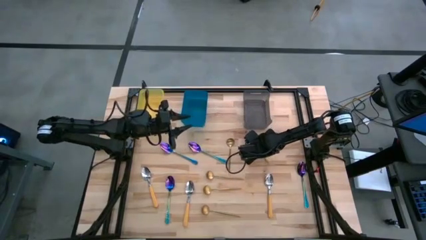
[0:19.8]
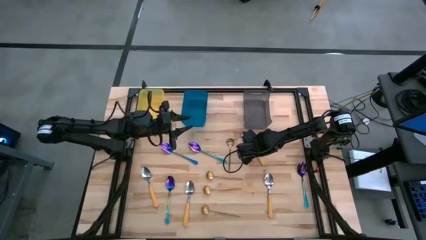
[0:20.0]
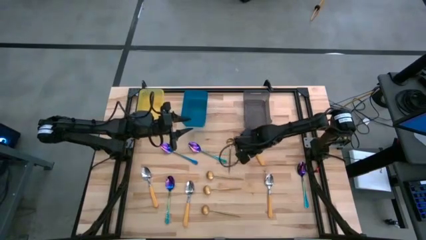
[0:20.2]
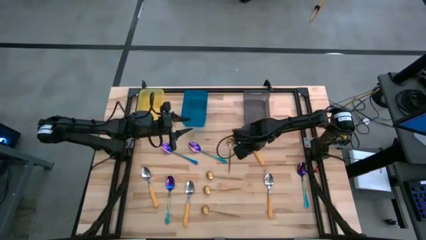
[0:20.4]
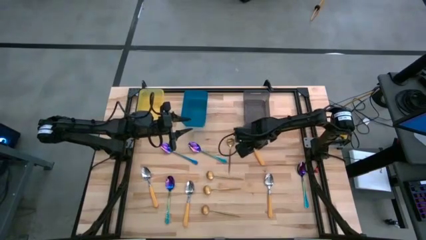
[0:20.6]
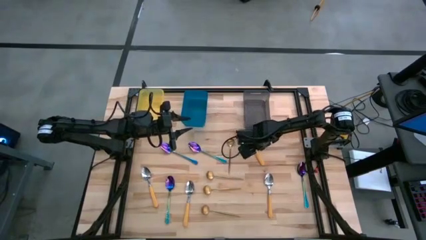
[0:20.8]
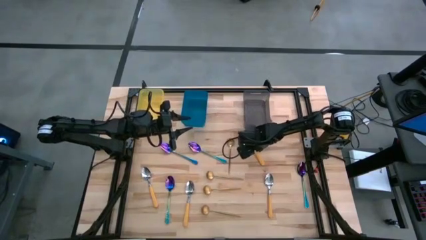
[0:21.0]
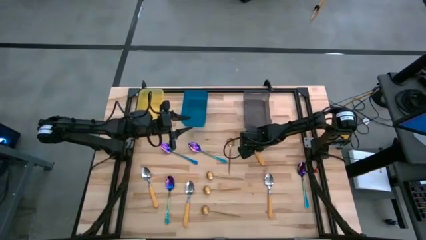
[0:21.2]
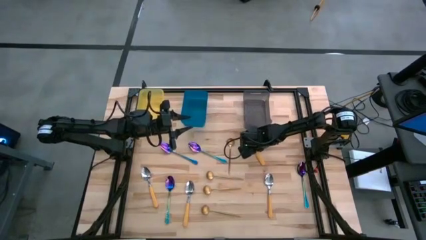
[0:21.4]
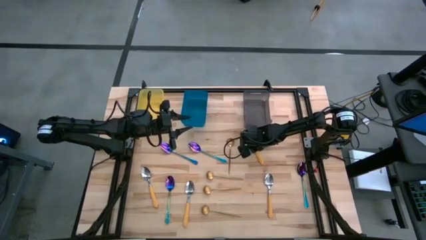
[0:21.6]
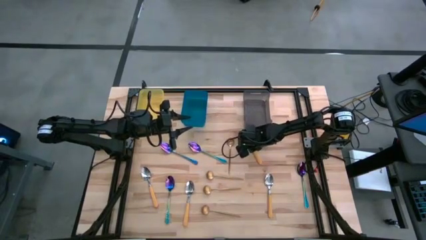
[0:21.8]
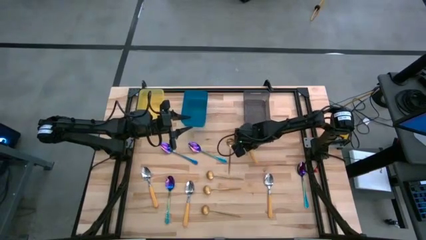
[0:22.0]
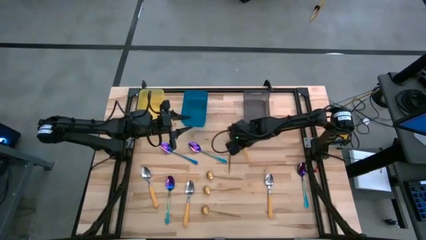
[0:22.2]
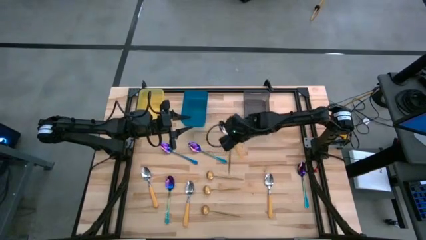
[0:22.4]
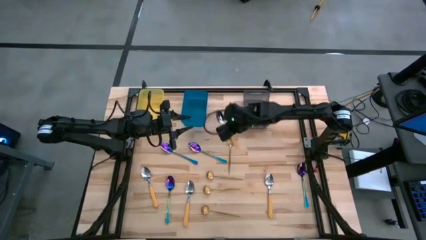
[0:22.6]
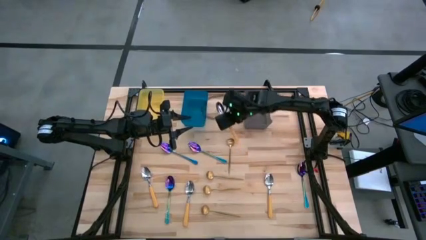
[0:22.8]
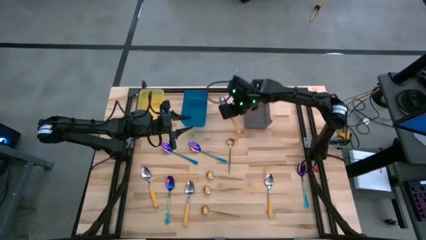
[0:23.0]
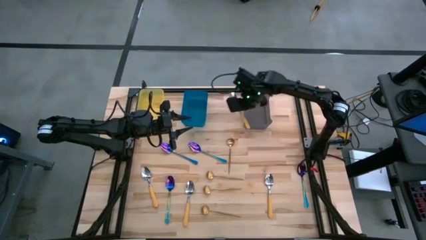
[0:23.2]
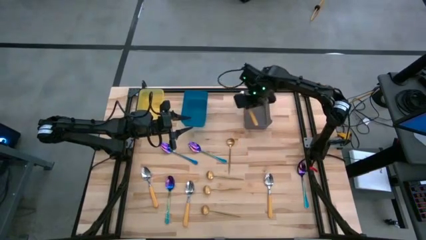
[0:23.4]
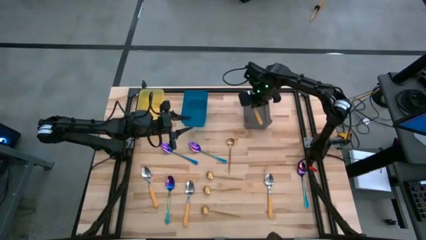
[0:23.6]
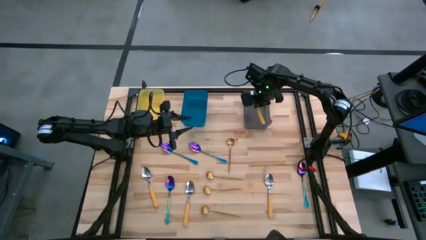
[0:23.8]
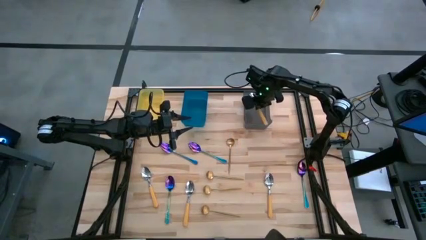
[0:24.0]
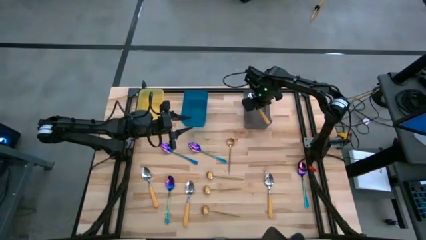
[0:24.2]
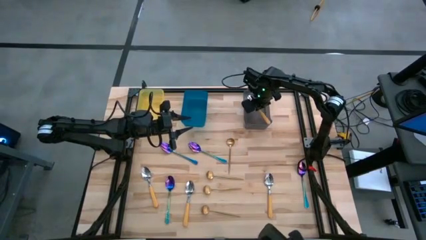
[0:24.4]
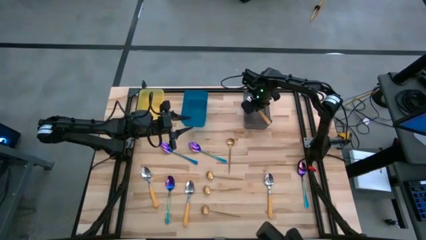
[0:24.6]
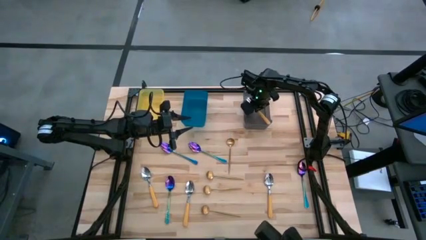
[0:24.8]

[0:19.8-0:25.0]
Task: Sort silverware by color (type)
Put the yellow spoon into the black bin

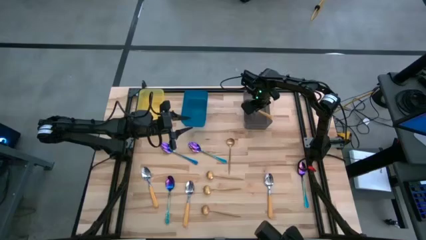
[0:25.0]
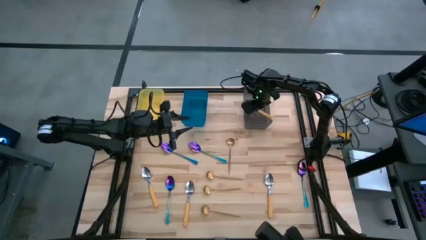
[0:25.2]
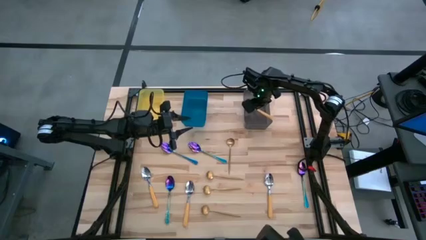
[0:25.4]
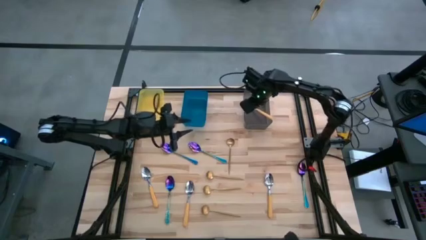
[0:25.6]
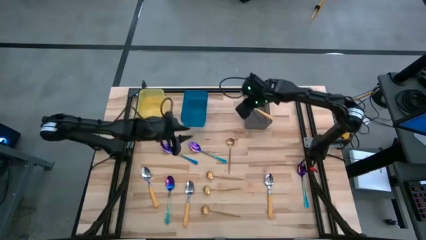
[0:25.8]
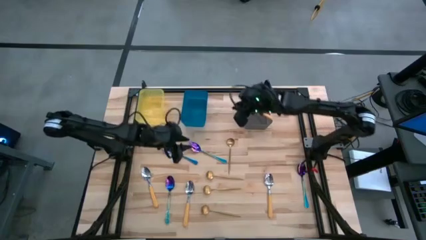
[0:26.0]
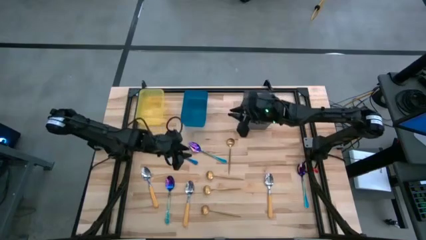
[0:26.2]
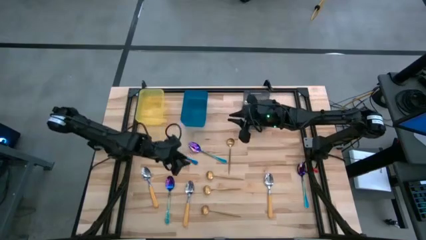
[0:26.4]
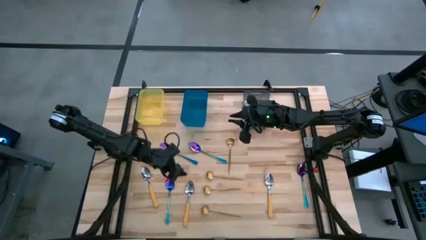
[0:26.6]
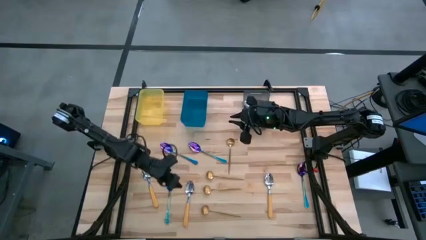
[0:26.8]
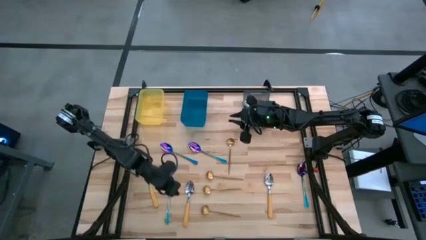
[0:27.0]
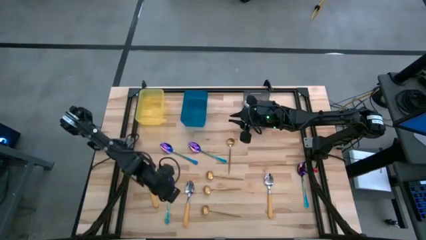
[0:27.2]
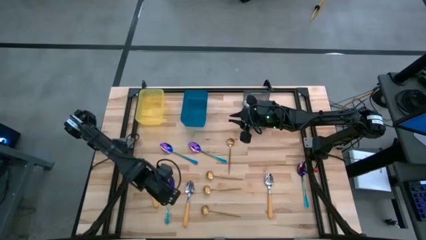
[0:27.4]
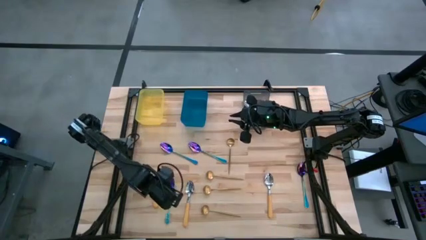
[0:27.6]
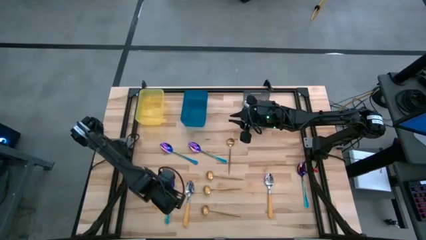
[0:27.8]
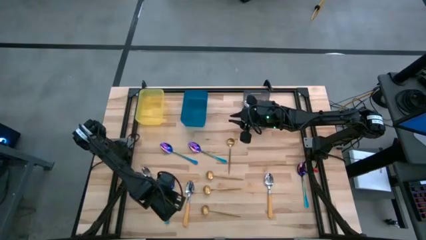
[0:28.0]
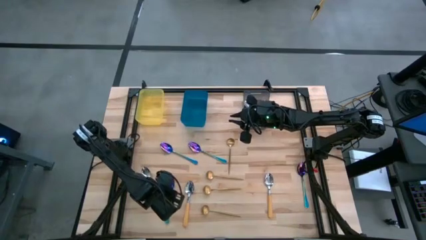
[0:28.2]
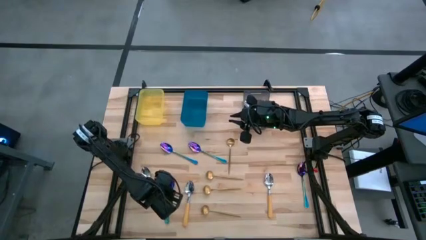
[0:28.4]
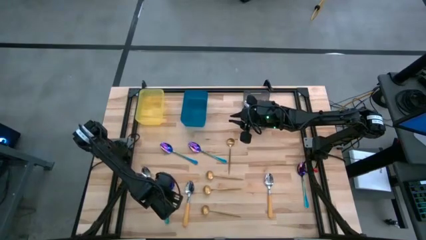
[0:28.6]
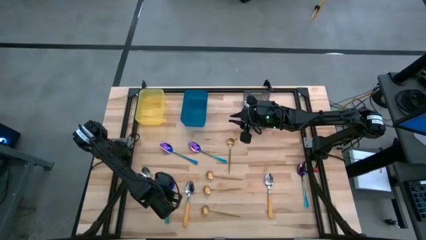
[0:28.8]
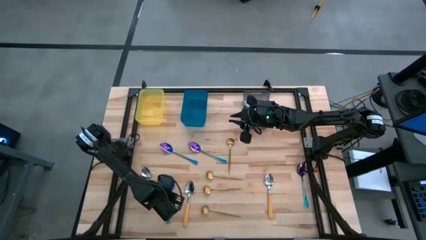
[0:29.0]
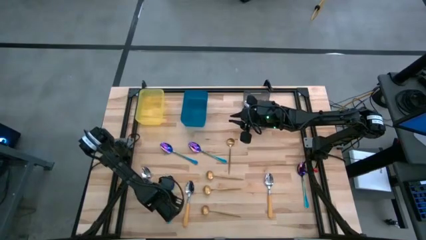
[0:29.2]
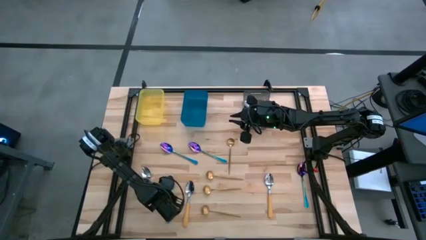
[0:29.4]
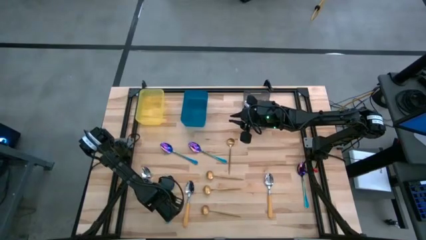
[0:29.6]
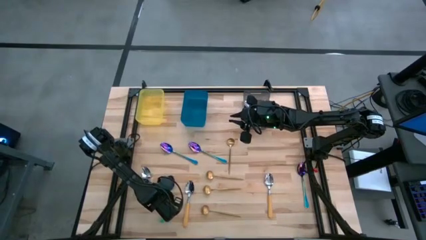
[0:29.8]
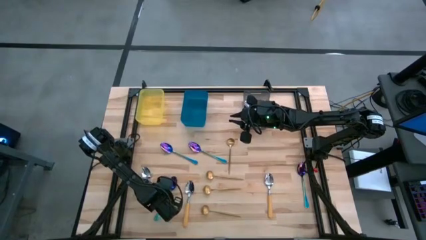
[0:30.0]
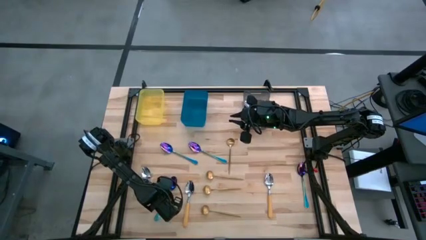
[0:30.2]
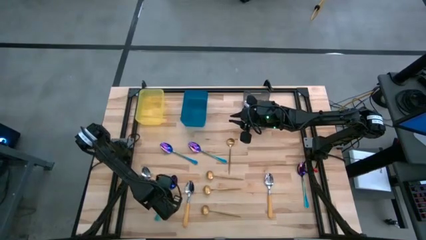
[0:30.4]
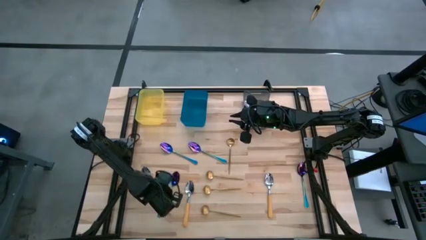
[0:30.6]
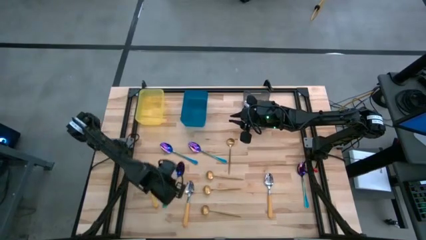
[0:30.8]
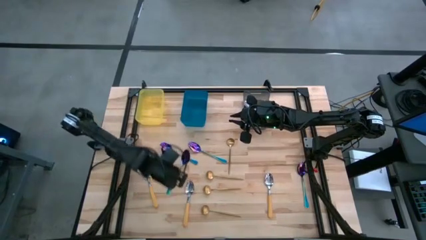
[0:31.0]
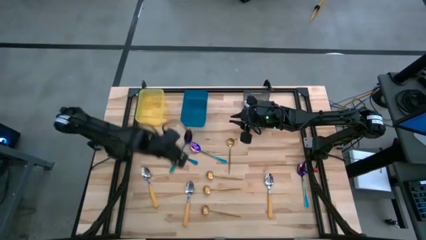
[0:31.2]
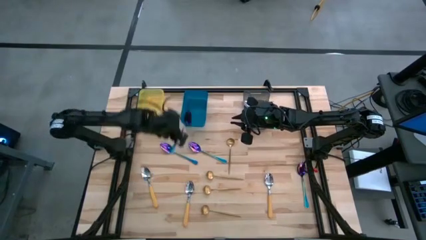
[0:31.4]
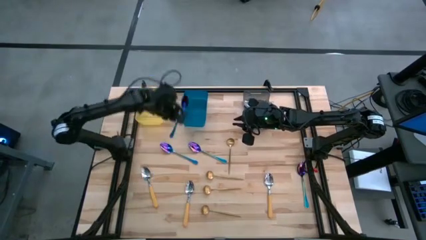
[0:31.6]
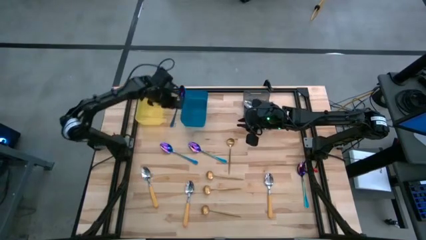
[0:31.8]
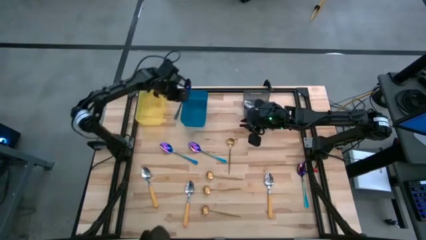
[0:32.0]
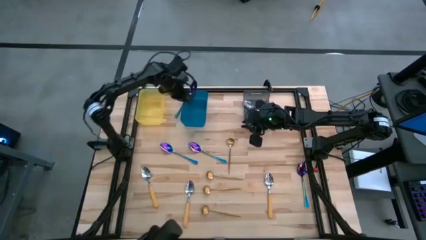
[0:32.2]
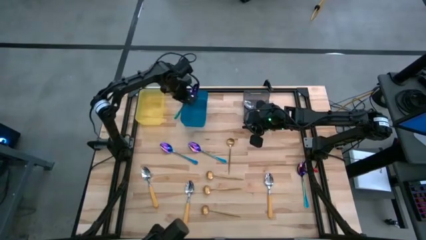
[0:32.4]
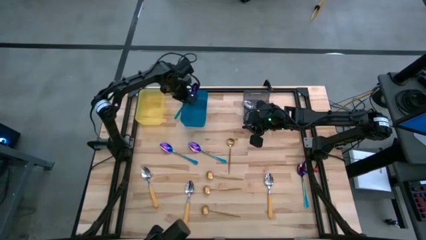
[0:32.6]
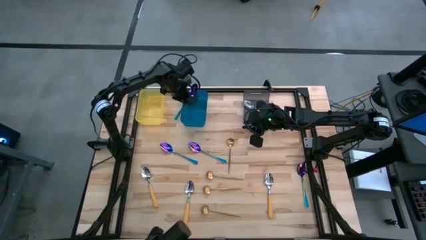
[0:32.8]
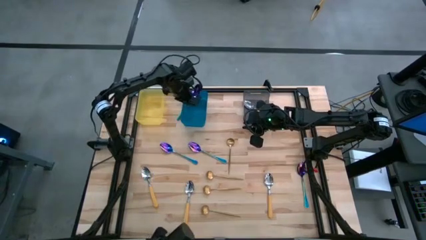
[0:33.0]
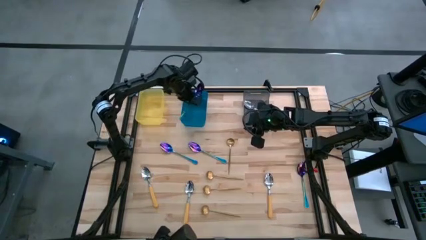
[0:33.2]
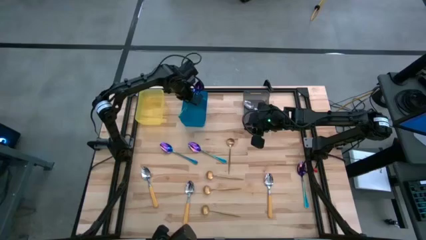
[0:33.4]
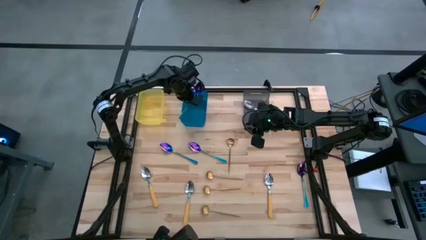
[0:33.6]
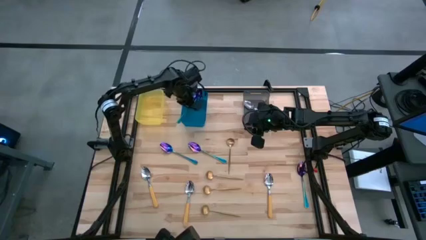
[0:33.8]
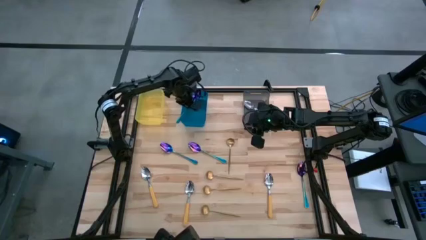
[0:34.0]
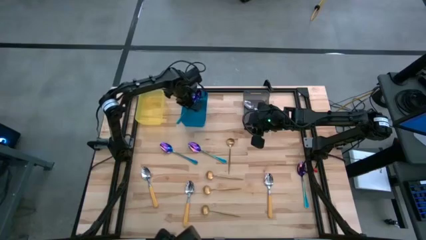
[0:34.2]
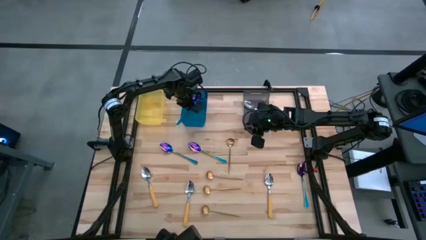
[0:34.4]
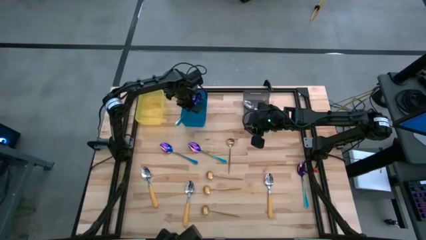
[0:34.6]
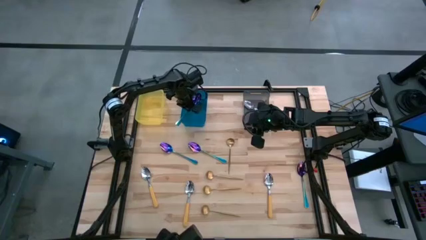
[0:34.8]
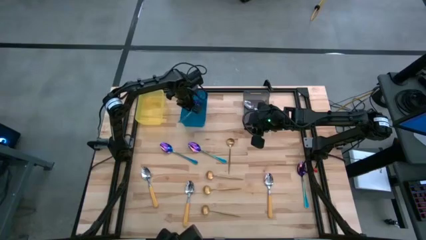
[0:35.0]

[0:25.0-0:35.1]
Put the blue spoon into the blue bin

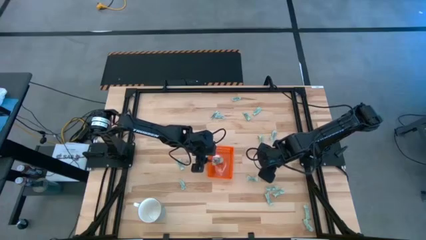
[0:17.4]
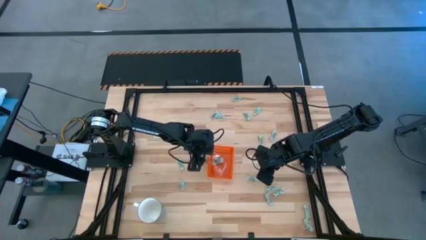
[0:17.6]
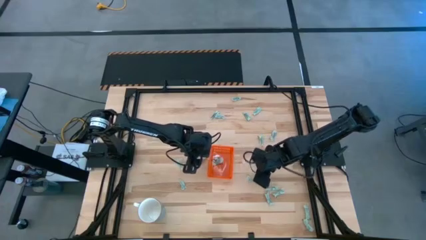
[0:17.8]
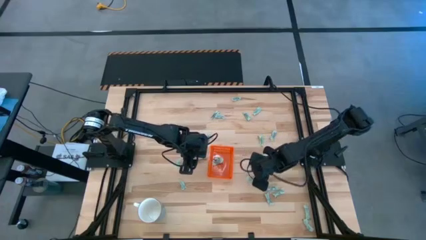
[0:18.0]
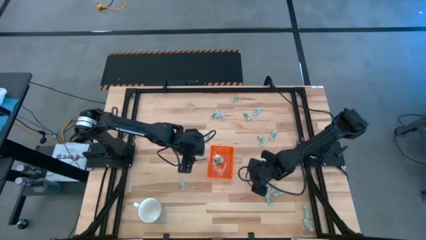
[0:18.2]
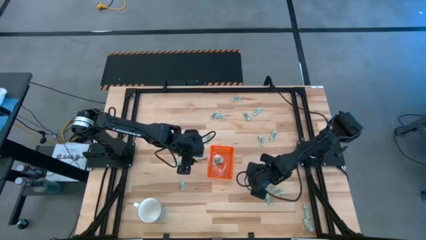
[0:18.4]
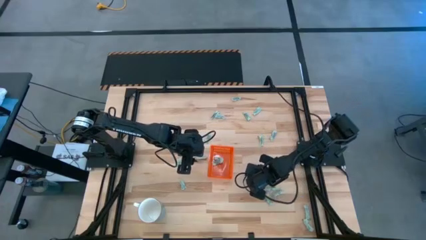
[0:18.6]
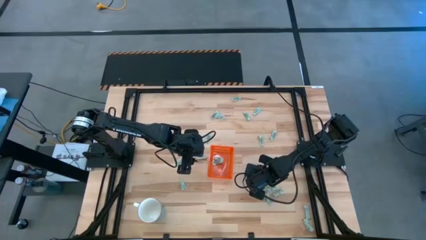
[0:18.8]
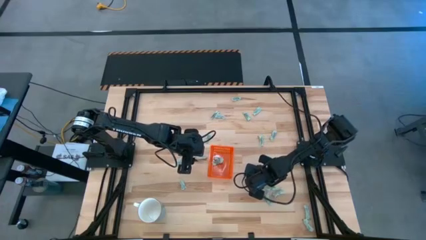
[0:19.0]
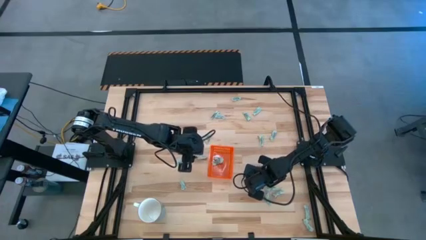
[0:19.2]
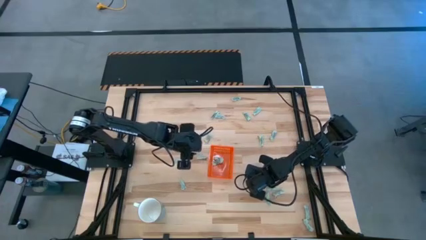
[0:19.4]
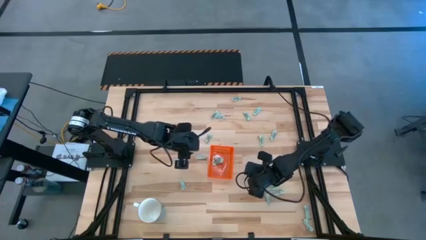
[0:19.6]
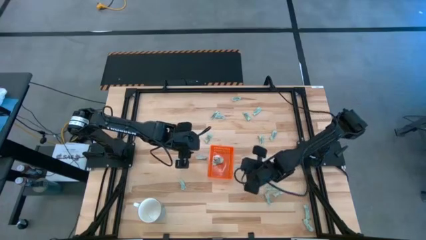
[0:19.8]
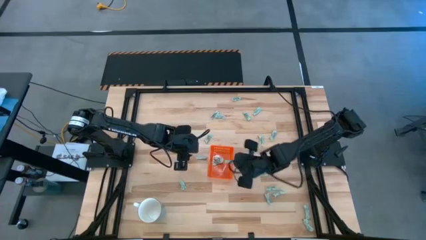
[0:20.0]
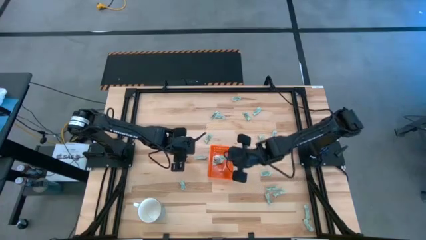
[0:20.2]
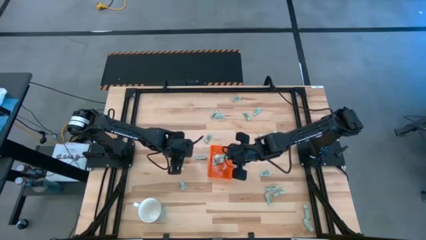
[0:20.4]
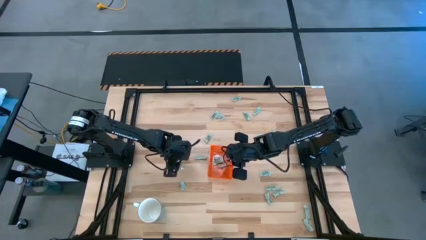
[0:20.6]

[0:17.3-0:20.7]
Task: Pick and place Stevia / Truvia into bins
Put the stevia packet into the orange bin
